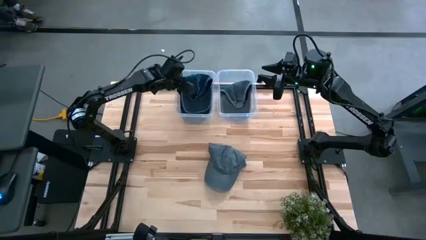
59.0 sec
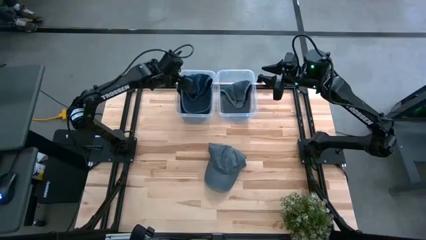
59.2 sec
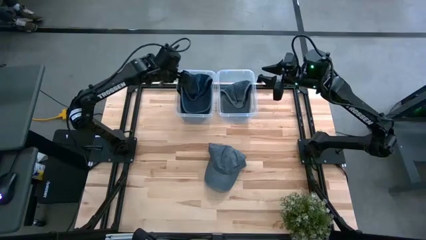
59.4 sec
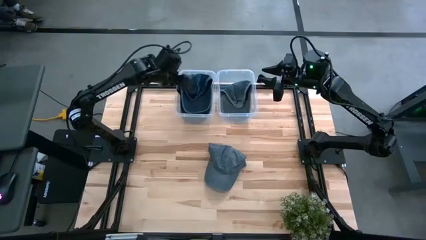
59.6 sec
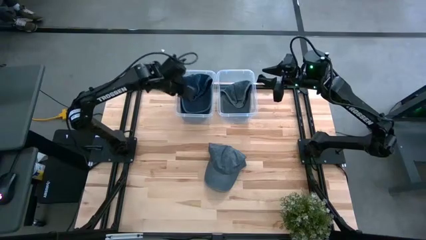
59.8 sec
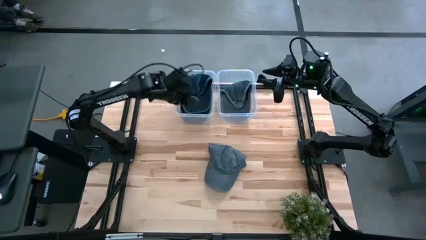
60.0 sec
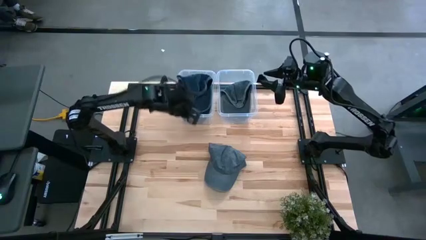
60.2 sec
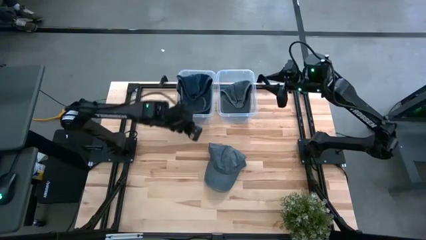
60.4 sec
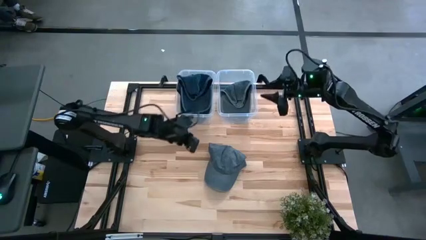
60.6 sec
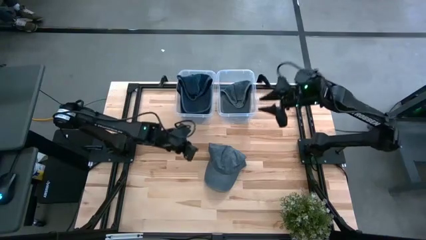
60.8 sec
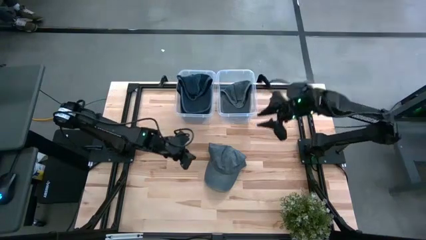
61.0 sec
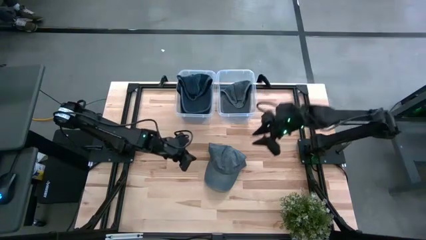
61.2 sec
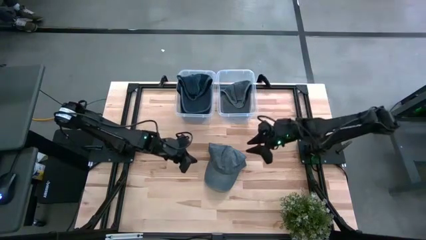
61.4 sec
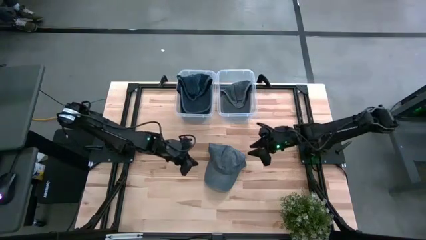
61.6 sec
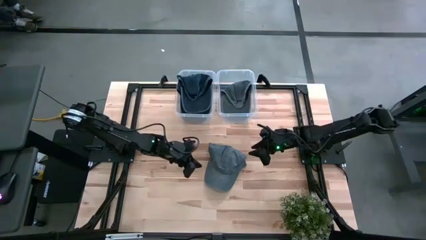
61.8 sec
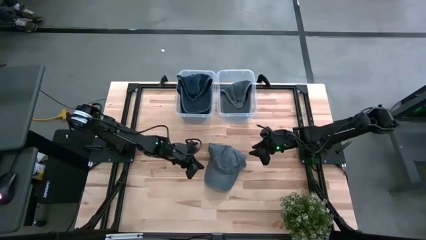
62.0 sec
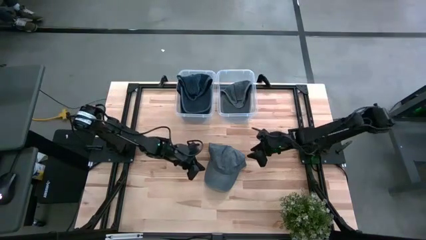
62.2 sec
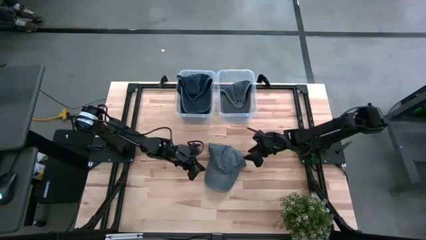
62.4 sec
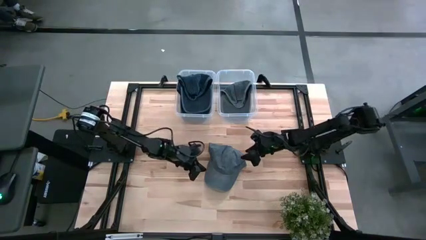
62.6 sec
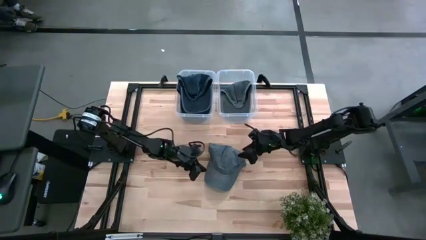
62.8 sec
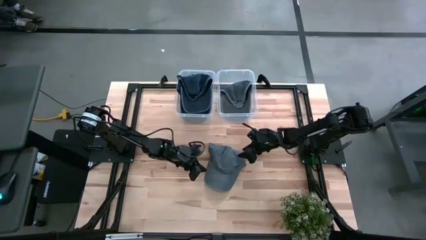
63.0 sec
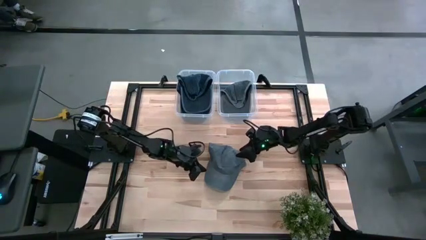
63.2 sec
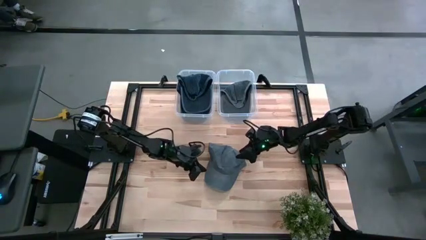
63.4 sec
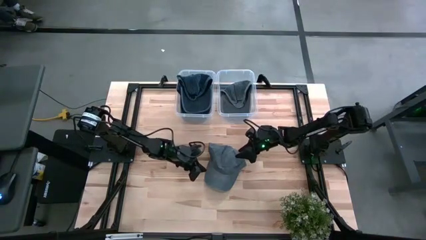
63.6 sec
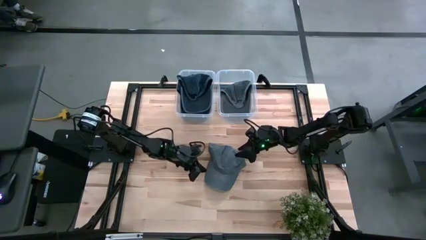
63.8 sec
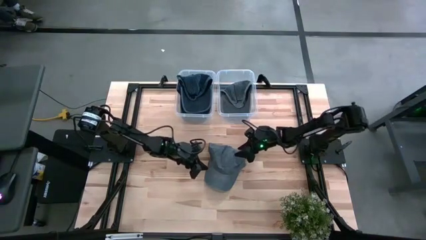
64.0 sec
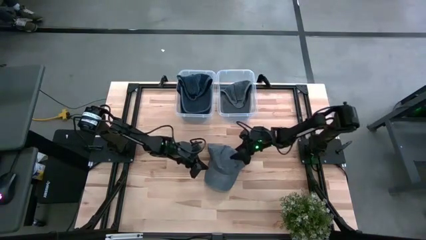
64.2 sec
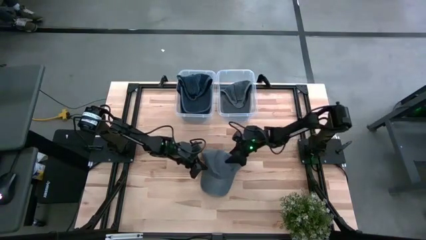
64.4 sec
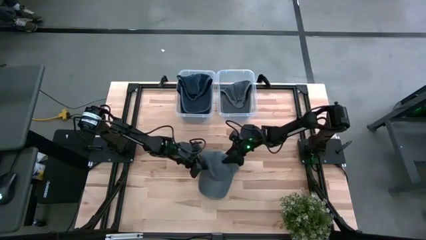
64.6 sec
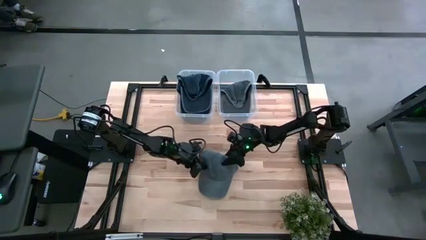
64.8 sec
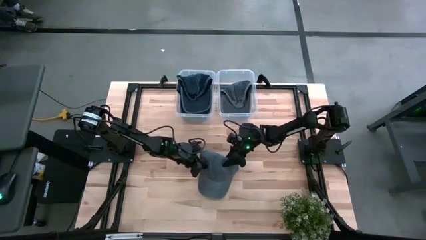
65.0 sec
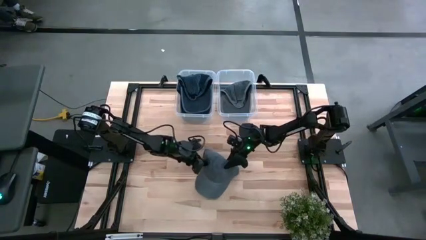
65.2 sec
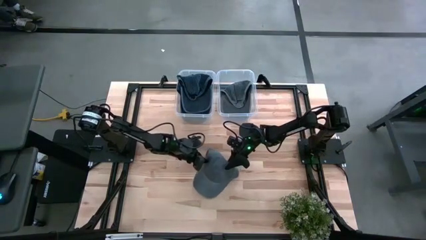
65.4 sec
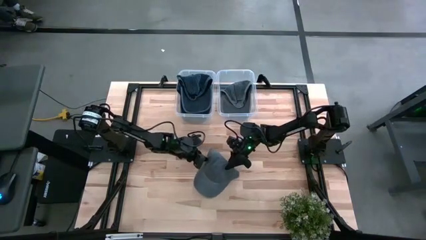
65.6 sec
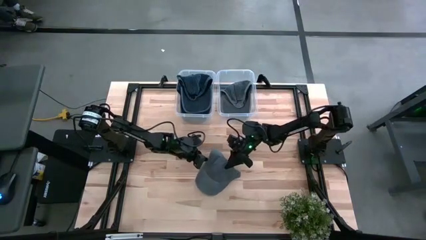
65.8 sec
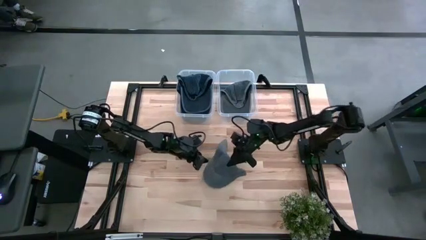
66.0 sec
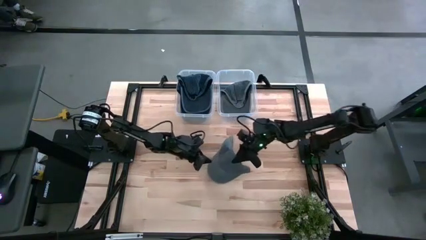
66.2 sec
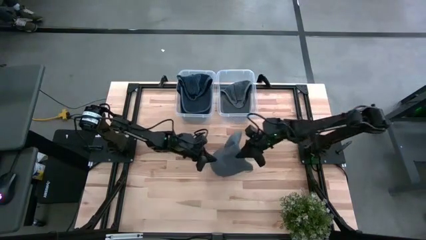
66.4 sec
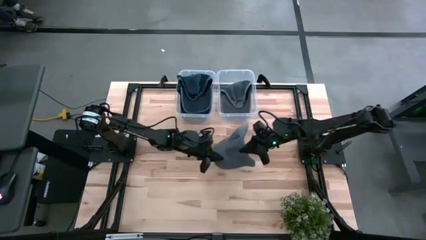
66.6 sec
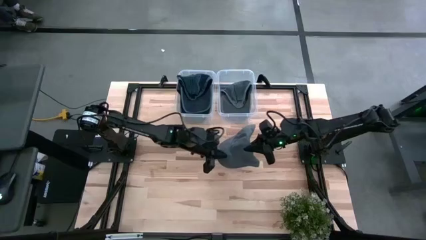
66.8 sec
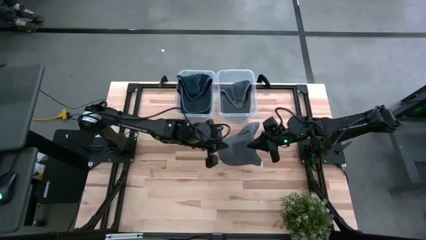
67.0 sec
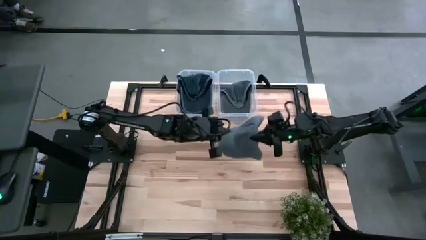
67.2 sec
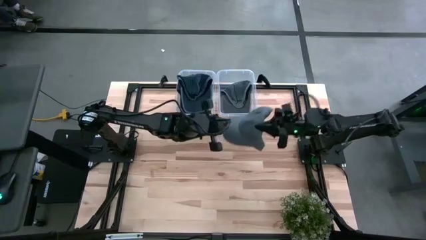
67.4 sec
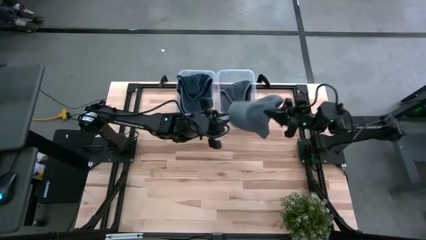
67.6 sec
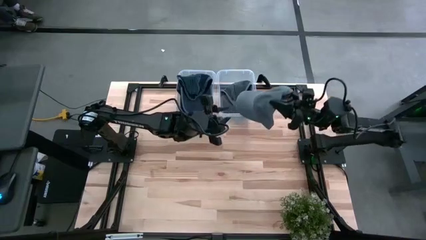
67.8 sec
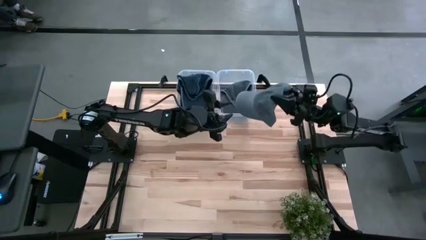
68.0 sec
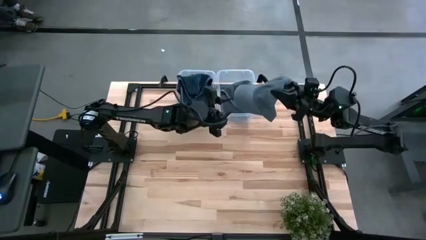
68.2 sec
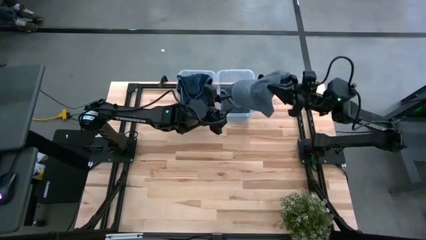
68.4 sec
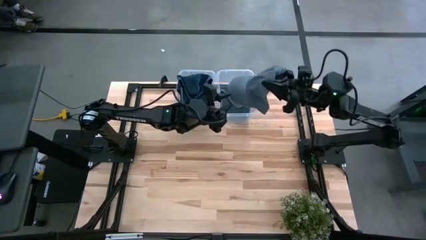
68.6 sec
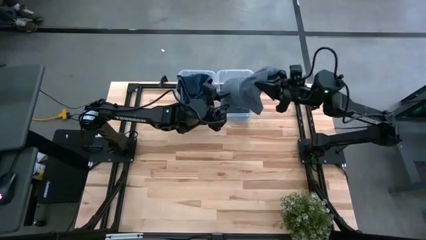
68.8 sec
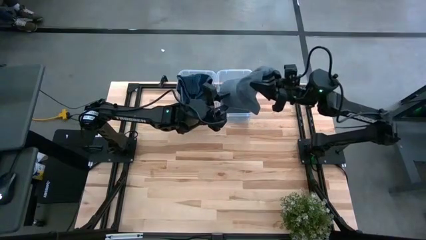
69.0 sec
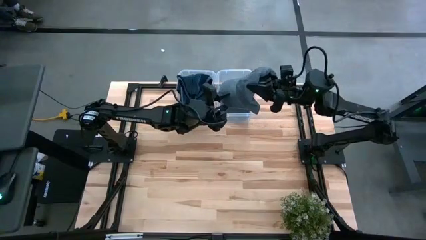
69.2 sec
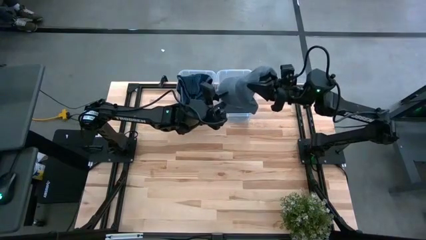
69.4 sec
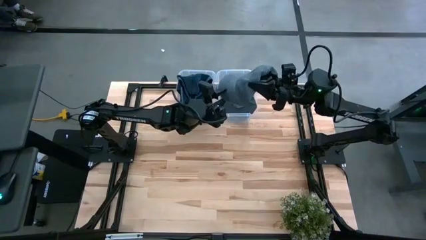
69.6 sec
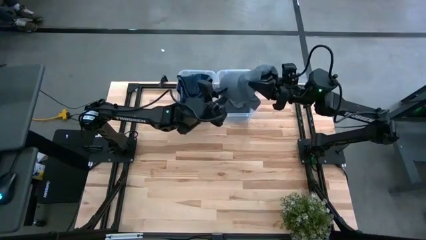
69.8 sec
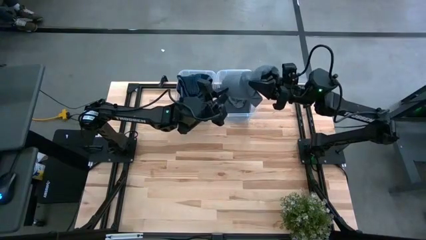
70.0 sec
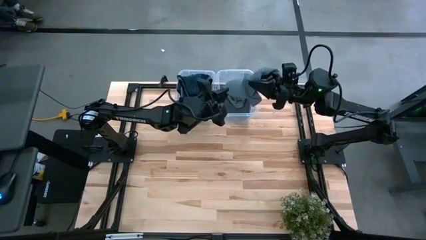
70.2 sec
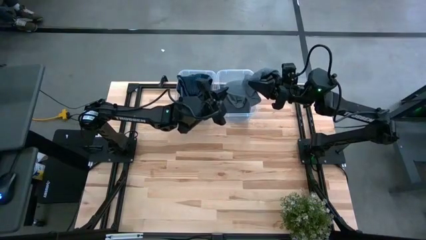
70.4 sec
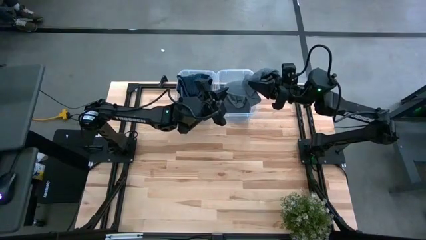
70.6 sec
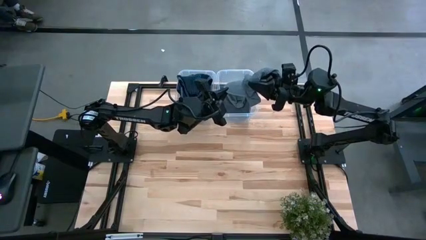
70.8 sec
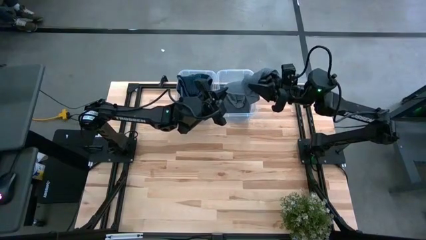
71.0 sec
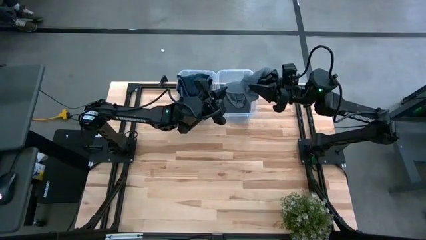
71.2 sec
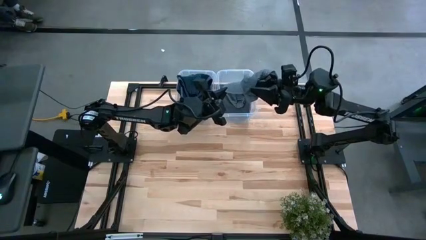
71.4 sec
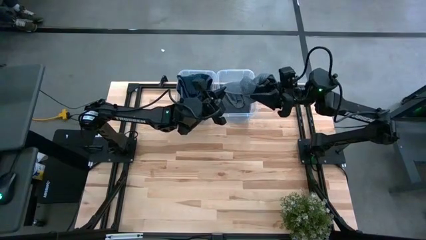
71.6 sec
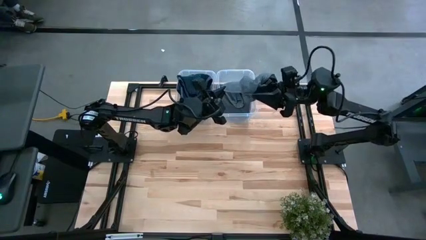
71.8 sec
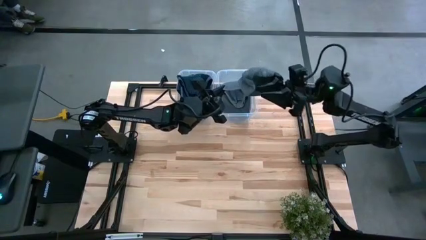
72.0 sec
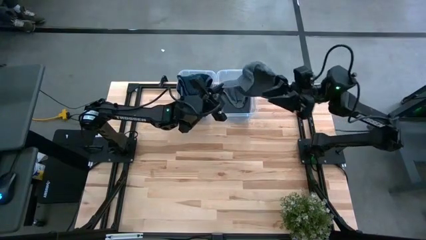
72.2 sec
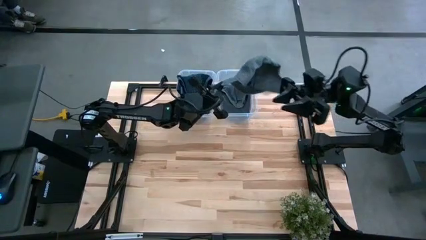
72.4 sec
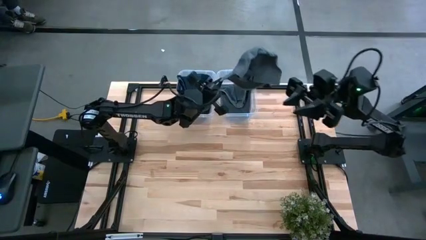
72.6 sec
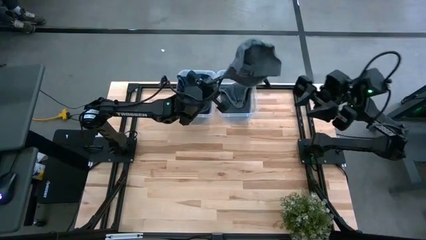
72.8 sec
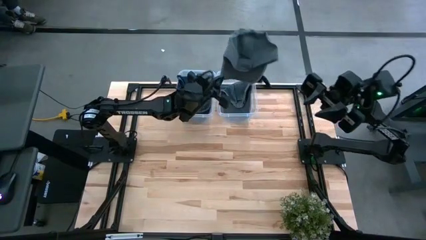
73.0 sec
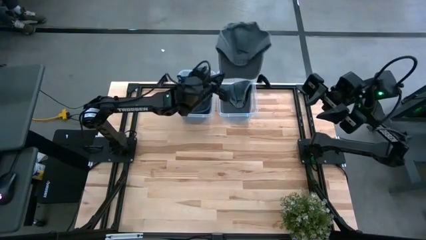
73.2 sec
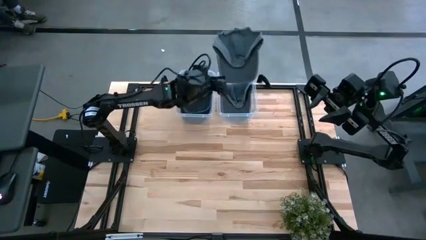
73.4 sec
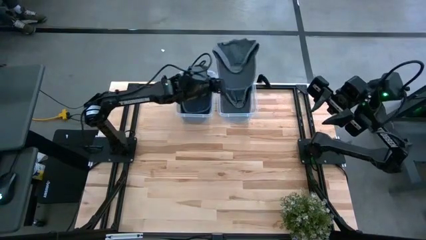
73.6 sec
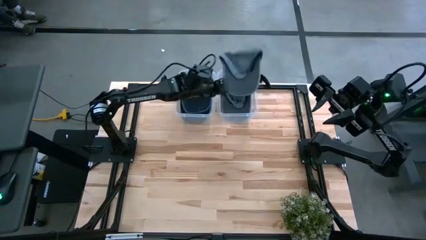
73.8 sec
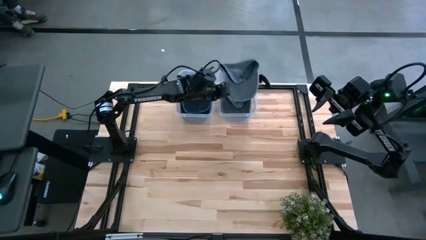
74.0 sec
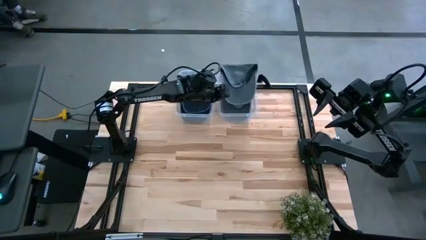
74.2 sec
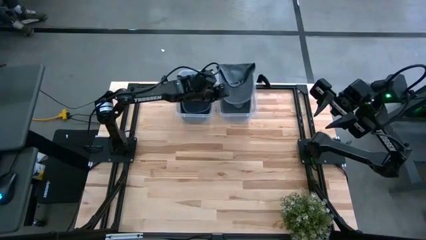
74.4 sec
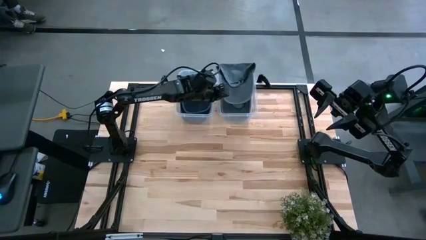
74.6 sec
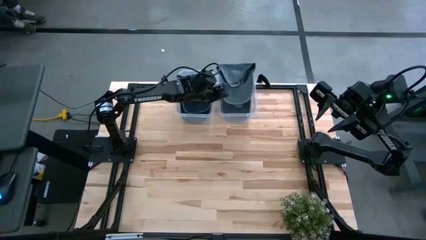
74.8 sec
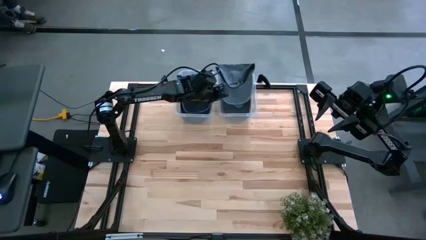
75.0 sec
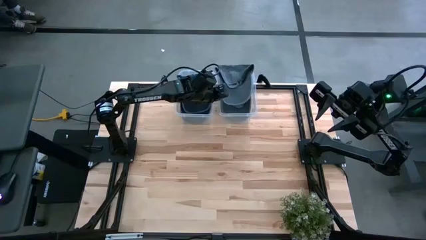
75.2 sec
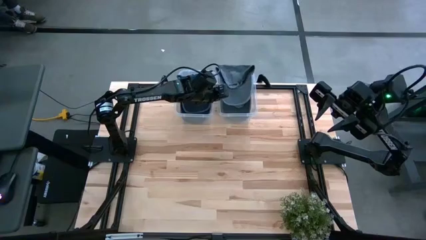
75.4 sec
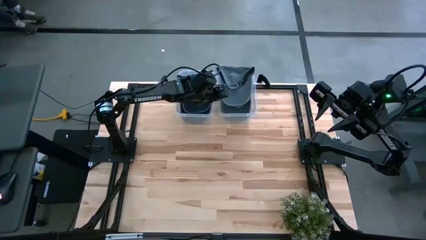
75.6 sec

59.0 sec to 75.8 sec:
Task: Pick and place caps into container
Put the gray cap into the right transparent container
